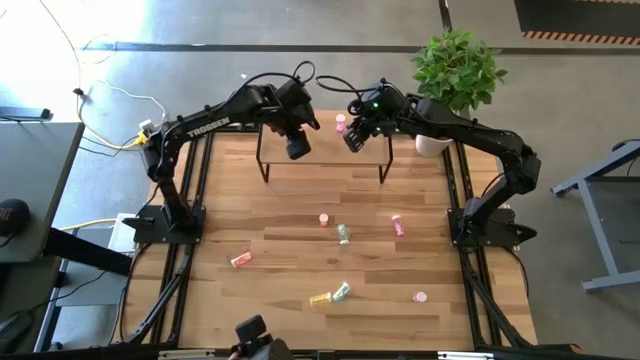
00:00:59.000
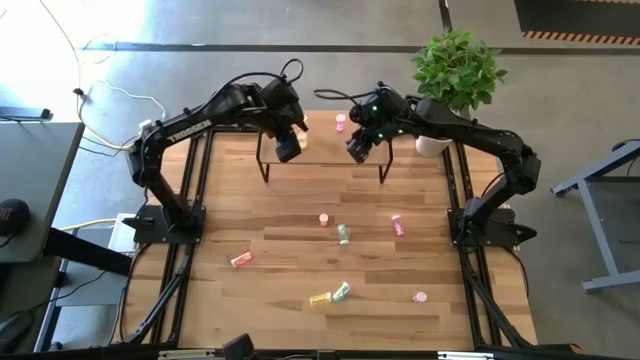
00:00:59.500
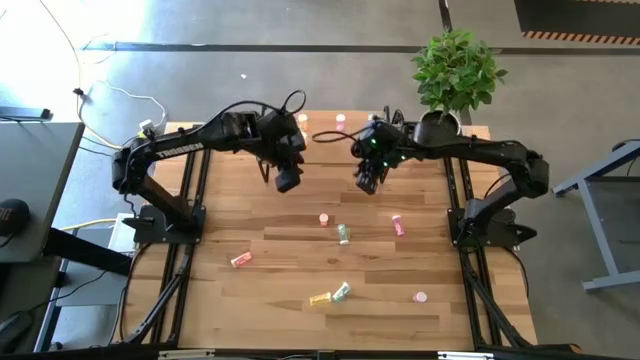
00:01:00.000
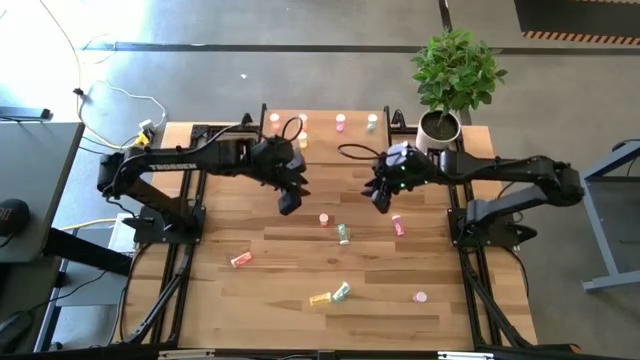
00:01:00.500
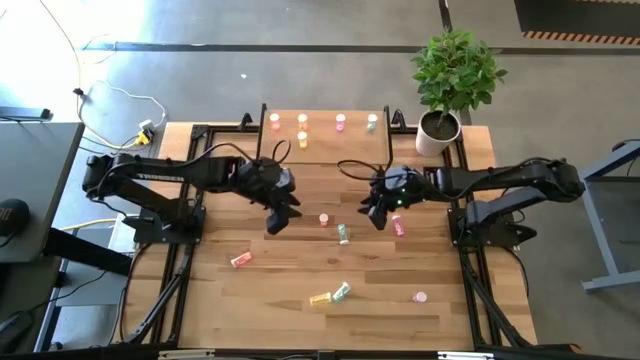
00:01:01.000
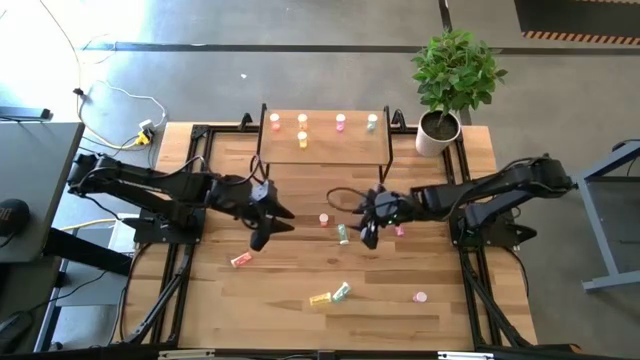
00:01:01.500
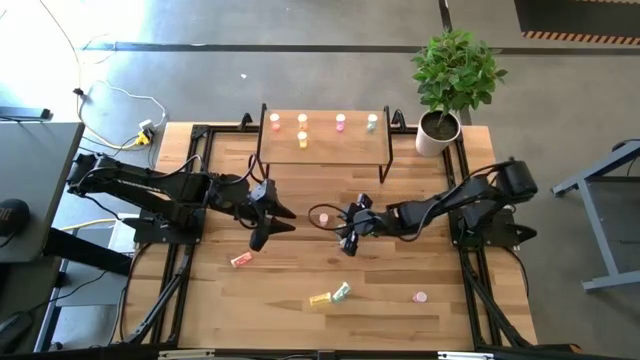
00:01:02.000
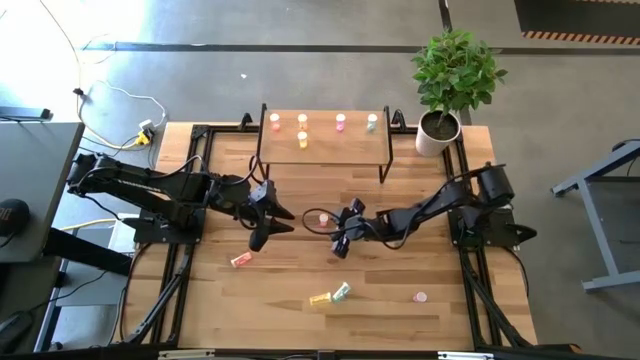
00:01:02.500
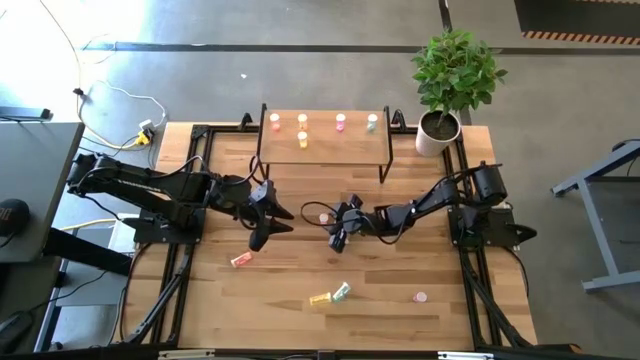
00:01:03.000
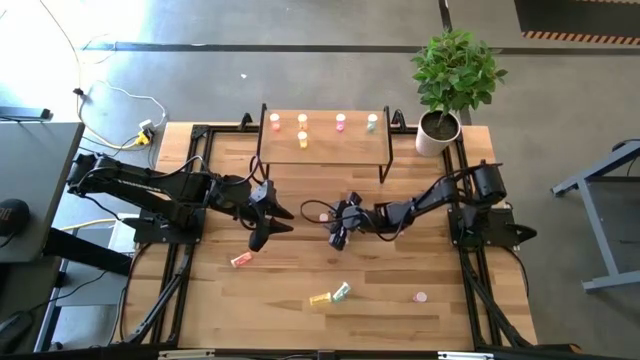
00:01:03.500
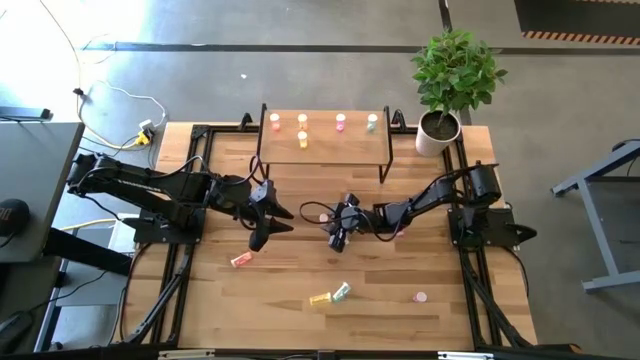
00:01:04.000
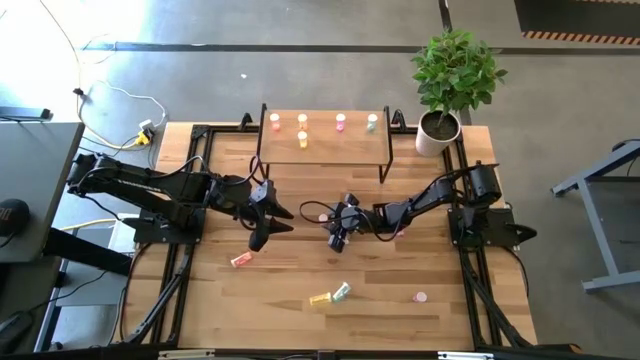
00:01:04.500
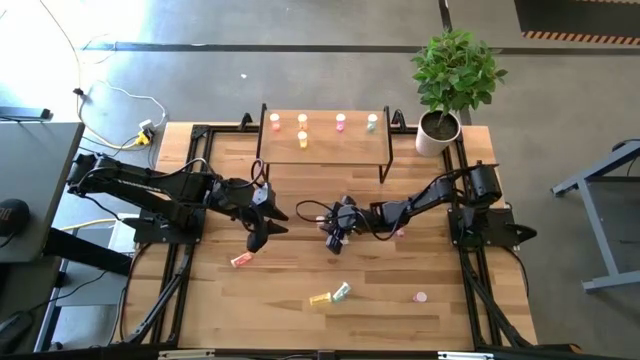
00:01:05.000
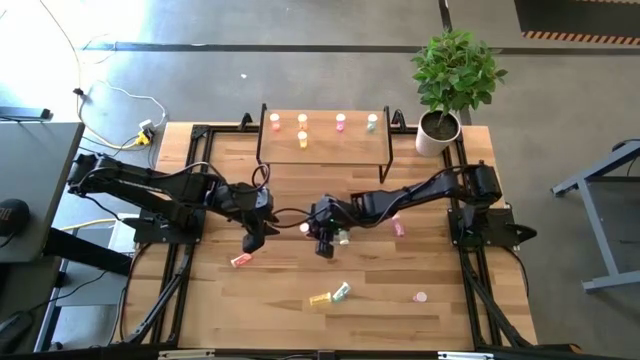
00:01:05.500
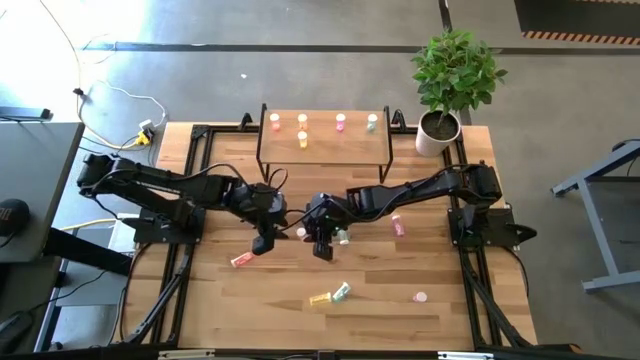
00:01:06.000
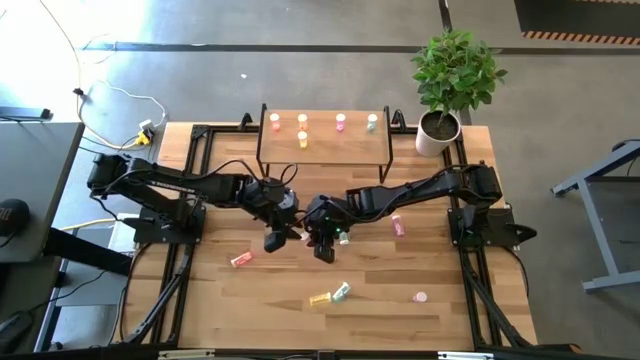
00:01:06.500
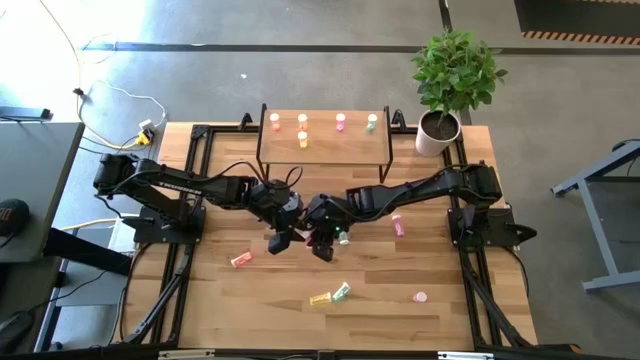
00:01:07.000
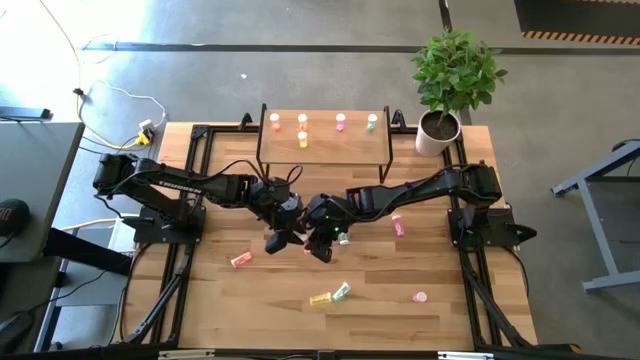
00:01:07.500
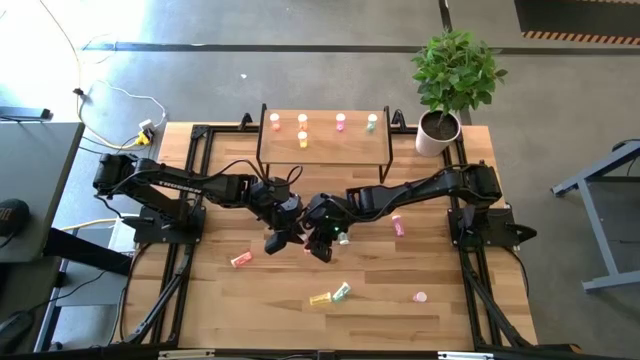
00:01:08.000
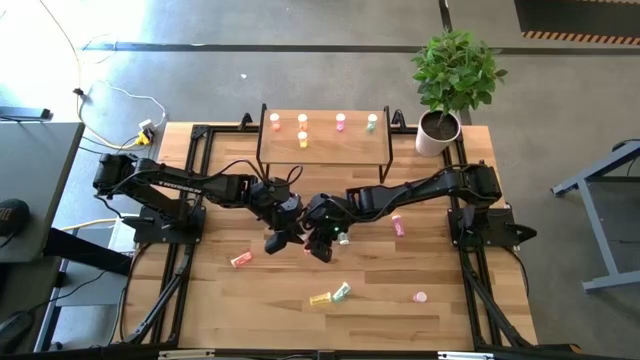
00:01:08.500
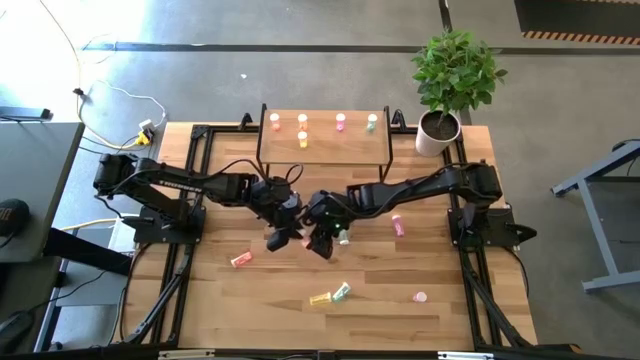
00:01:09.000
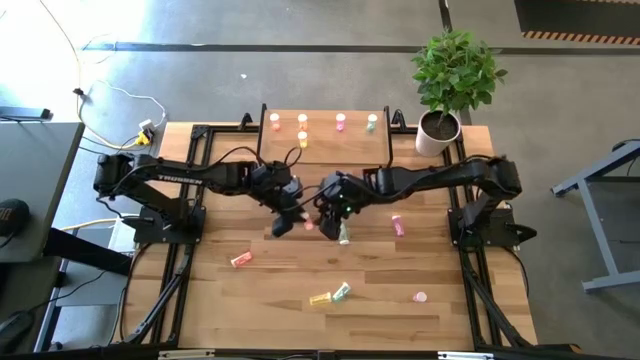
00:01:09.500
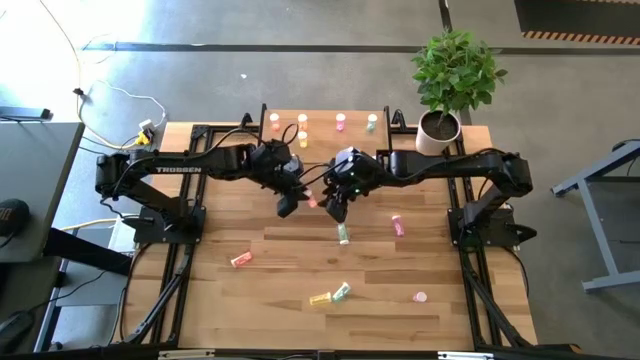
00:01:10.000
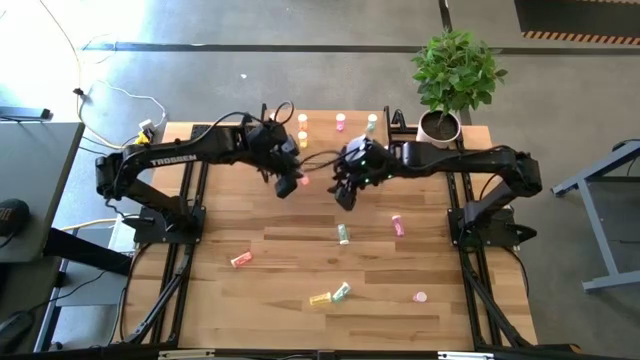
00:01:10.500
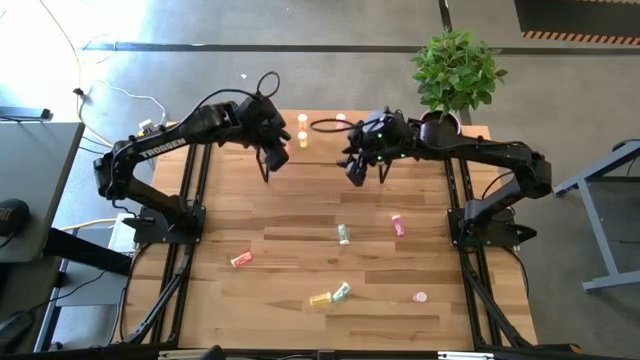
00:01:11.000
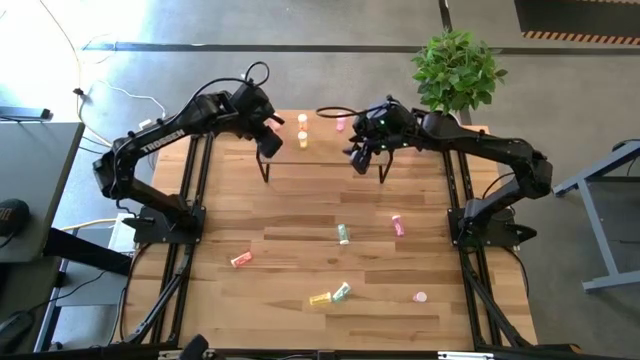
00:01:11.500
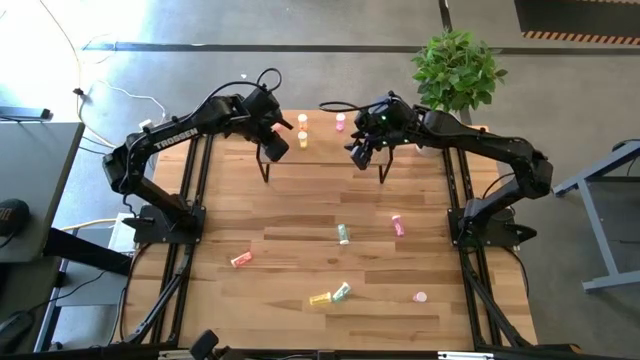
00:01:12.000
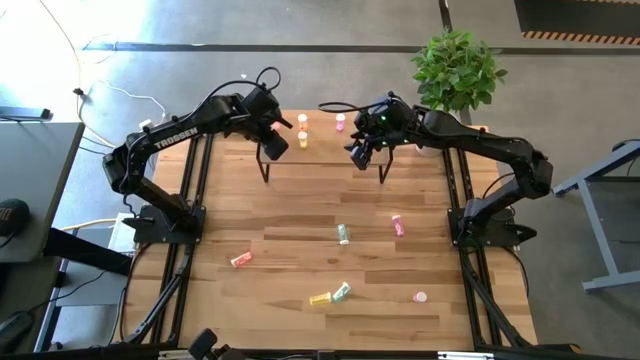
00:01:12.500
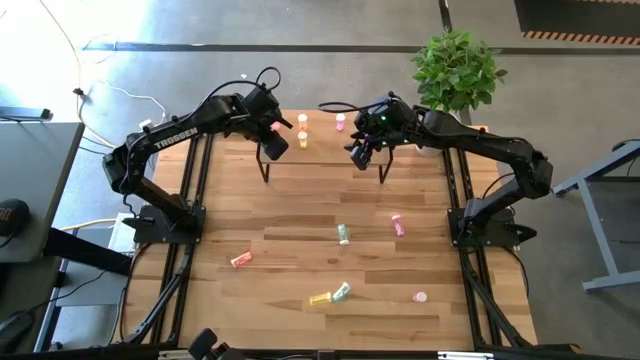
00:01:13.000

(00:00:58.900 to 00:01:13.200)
Task: Pick and place medicine bottles onto shelf by color
Put the right pink pill bottle on the shelf aligned with the other pink pill bottle

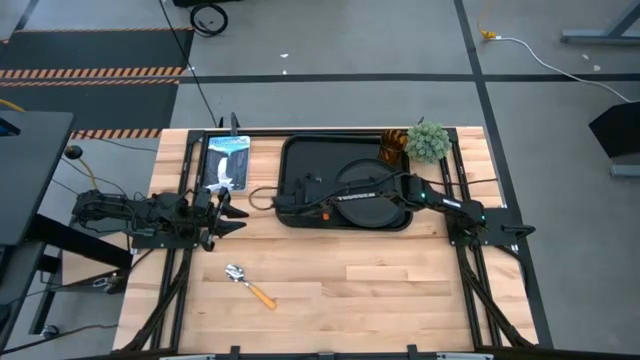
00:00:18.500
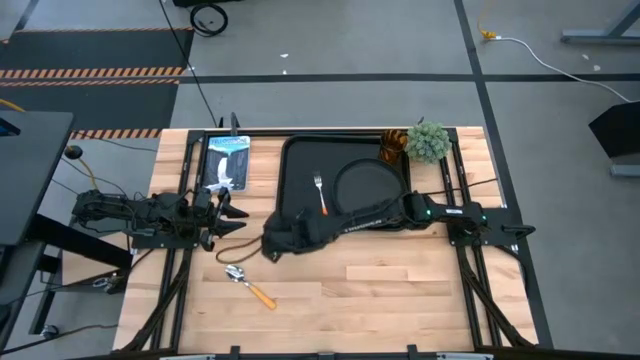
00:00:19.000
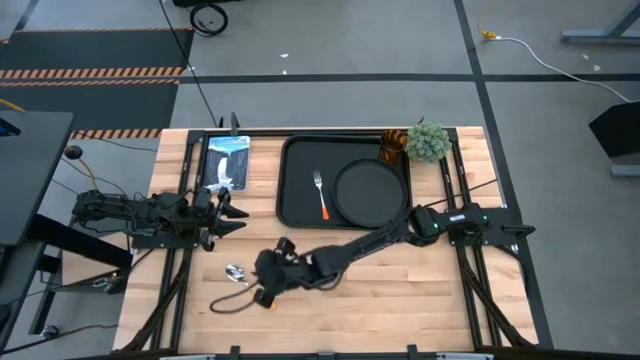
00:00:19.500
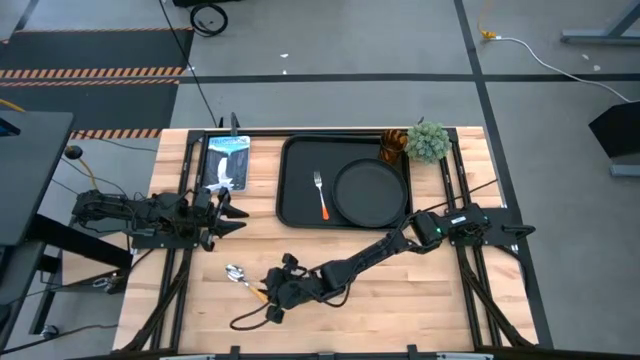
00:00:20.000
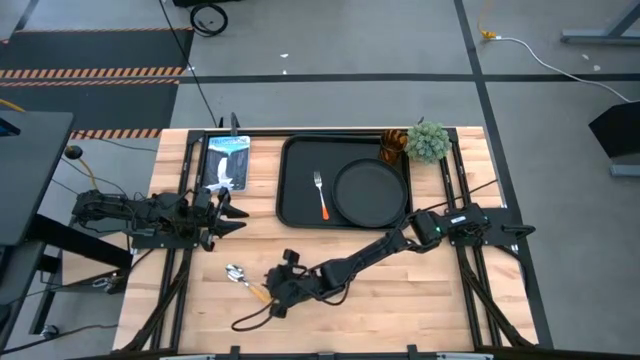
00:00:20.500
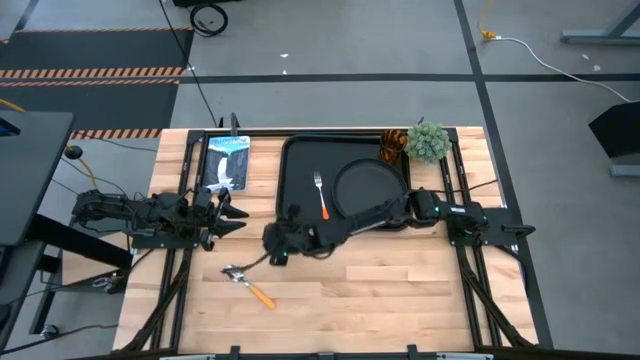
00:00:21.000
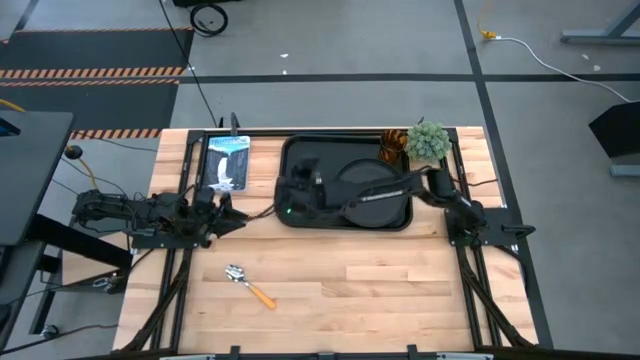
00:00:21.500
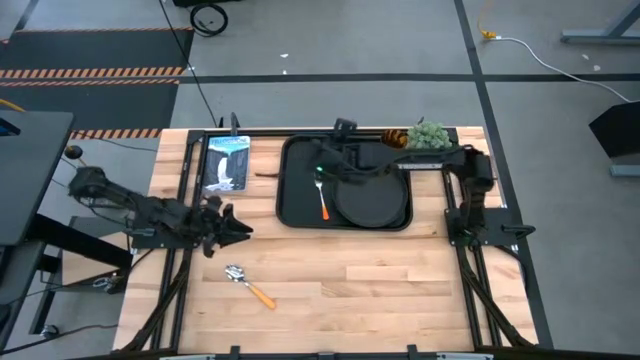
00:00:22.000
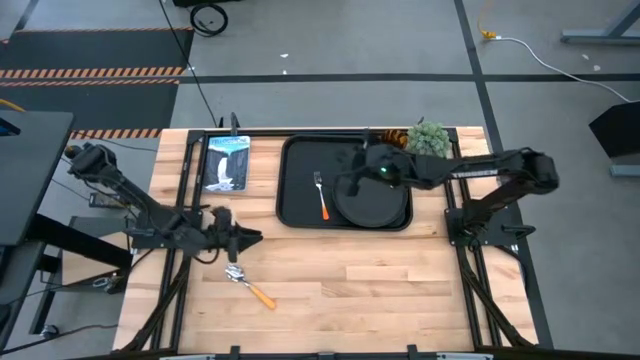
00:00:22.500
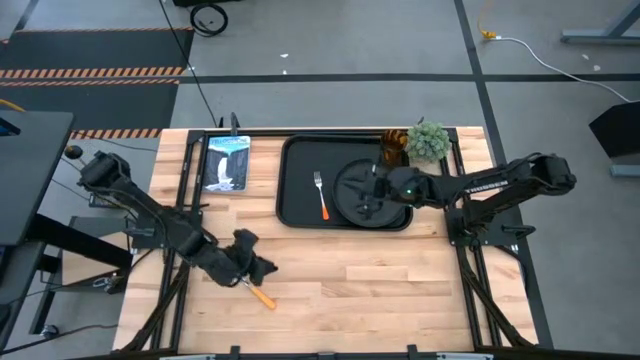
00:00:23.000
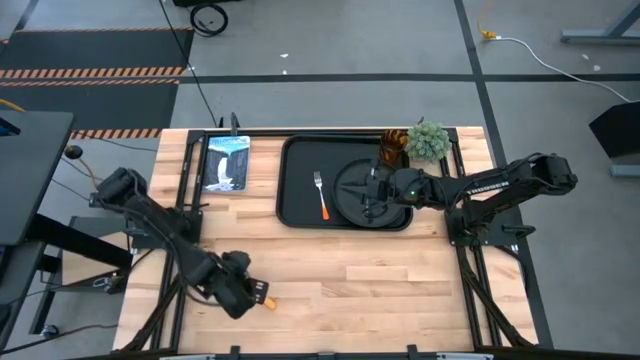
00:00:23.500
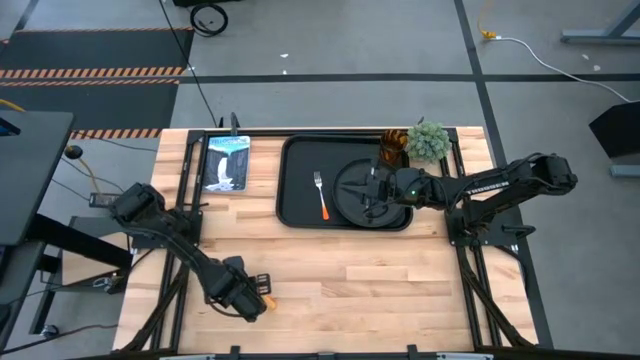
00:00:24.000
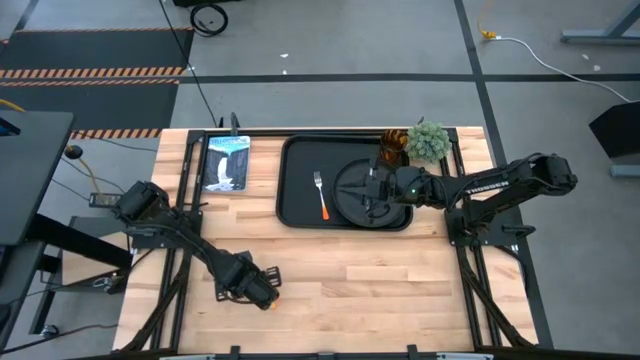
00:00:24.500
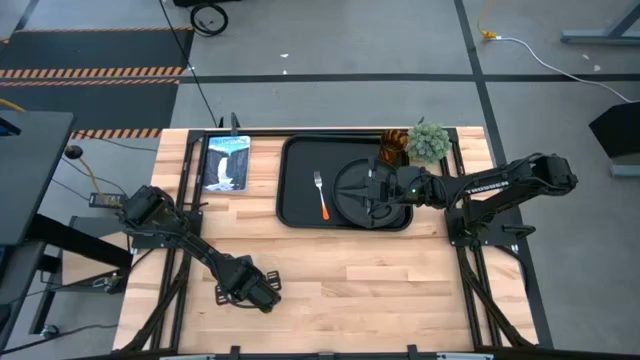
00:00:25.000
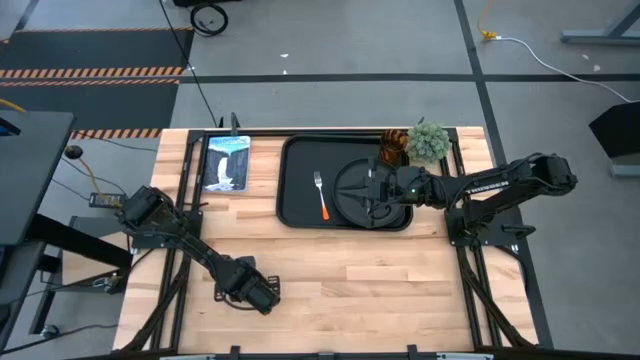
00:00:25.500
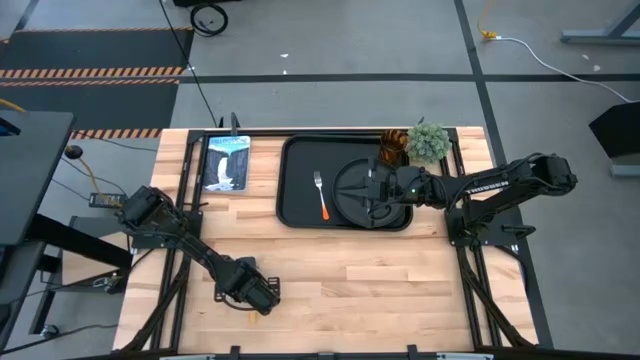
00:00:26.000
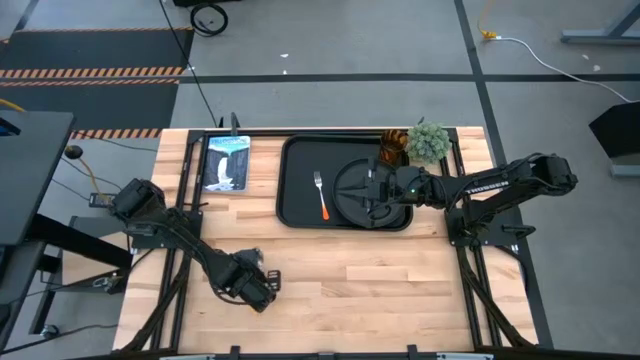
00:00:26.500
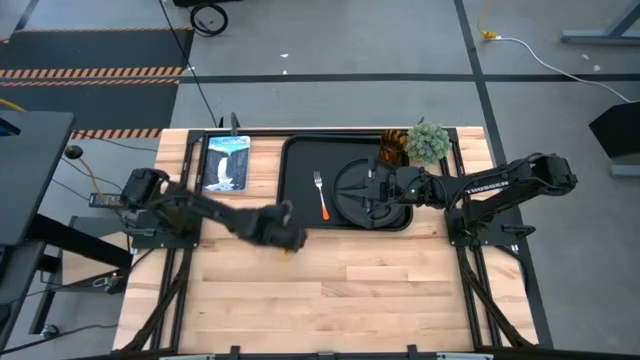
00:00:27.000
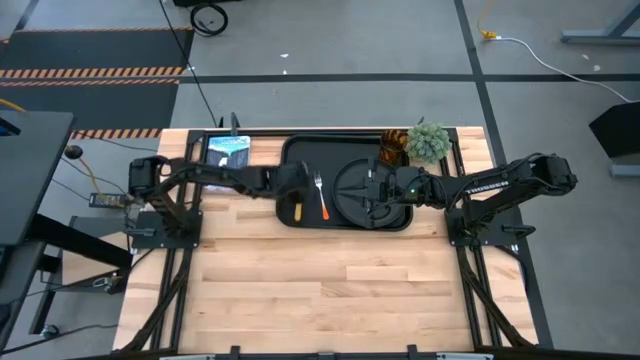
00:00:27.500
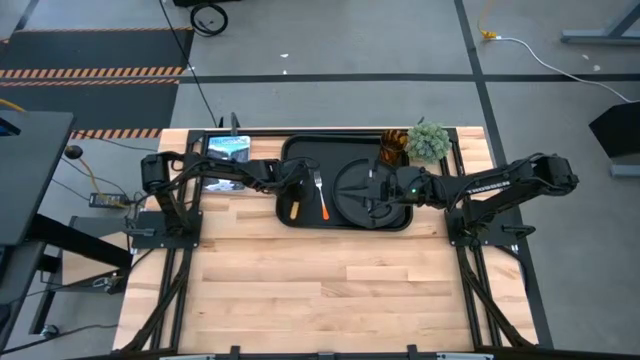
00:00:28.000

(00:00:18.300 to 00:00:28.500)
Task: Pick and place plate/cup/fork/spoon on tray
Put the yellow spoon on the black tray to the left of the orange fork
